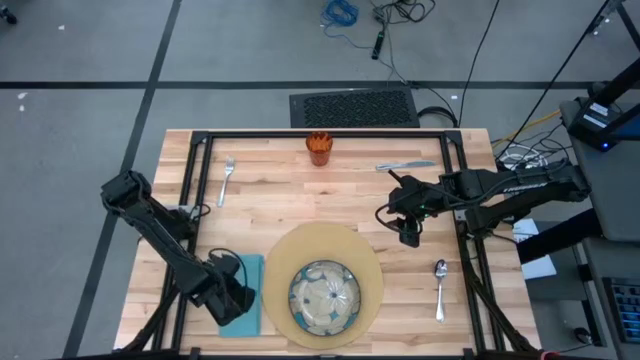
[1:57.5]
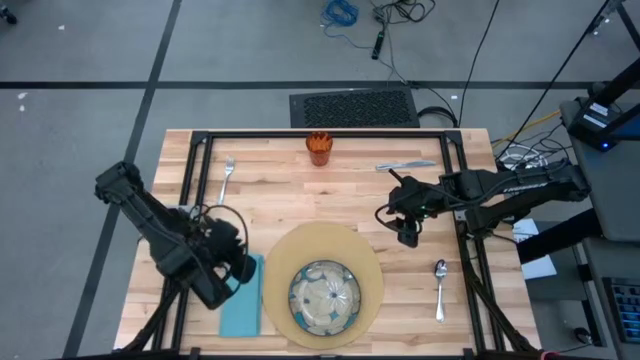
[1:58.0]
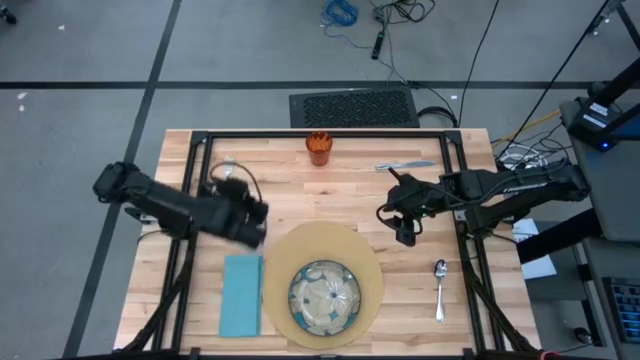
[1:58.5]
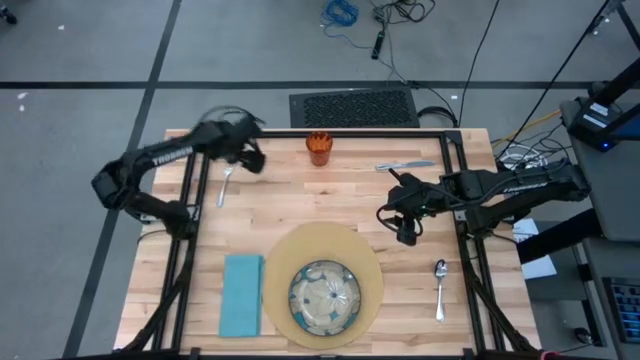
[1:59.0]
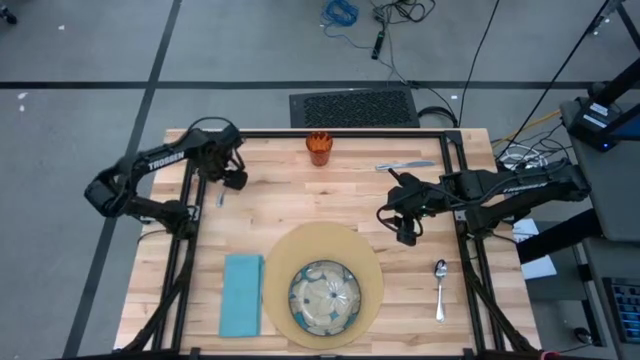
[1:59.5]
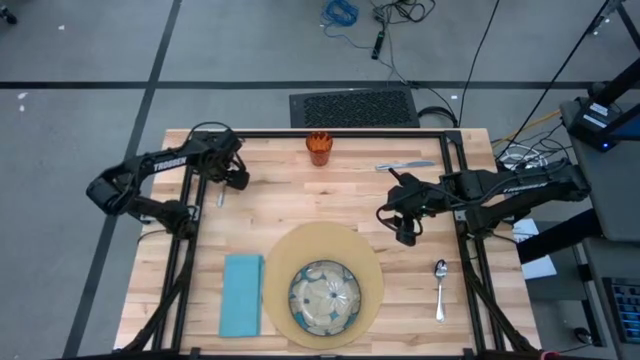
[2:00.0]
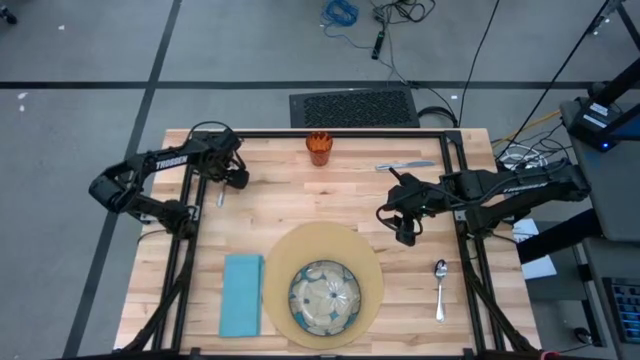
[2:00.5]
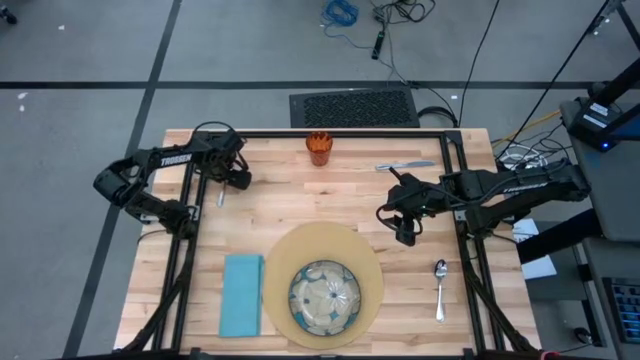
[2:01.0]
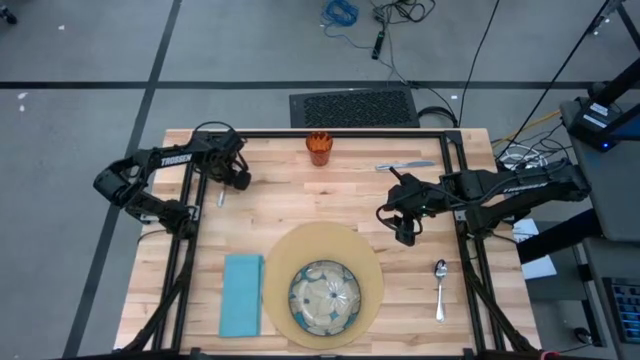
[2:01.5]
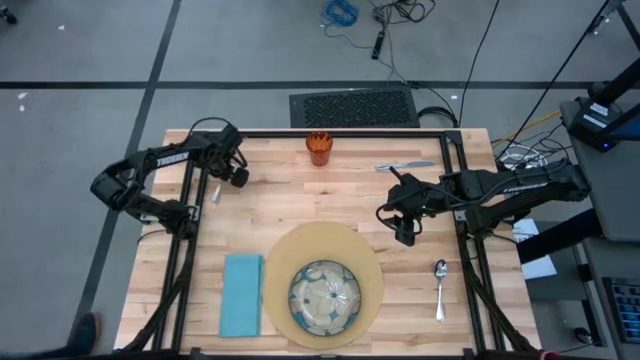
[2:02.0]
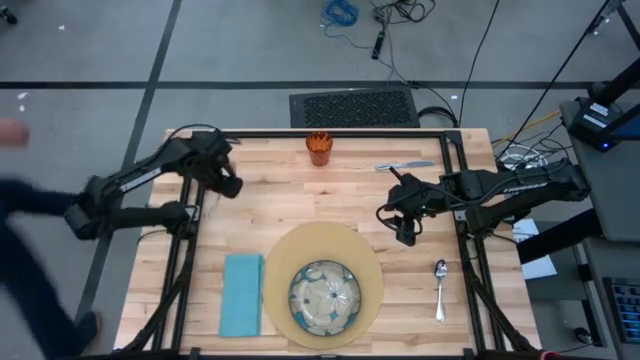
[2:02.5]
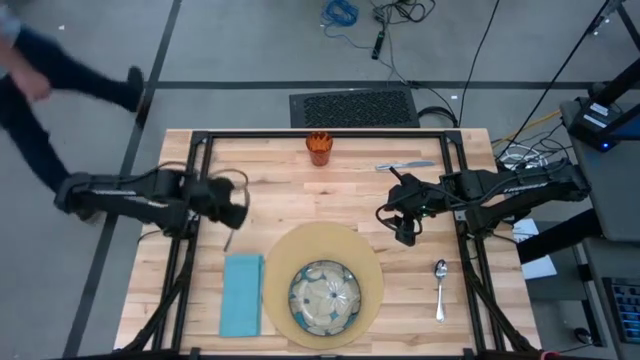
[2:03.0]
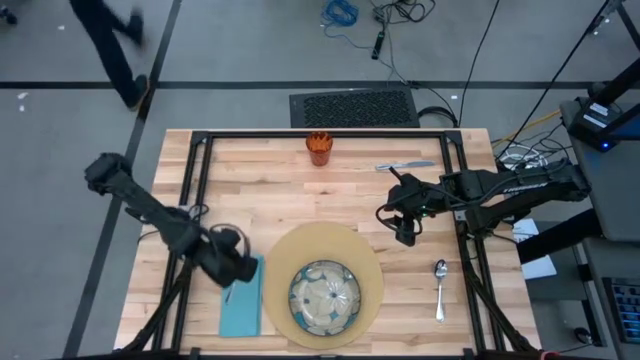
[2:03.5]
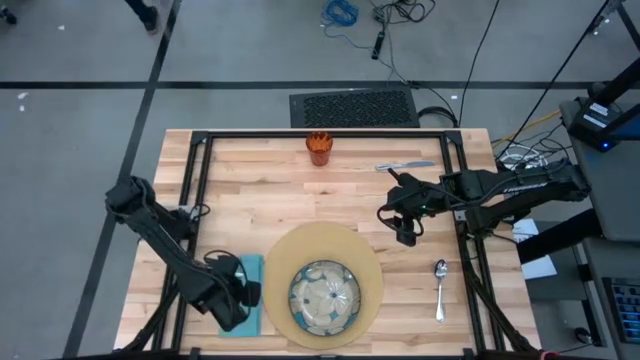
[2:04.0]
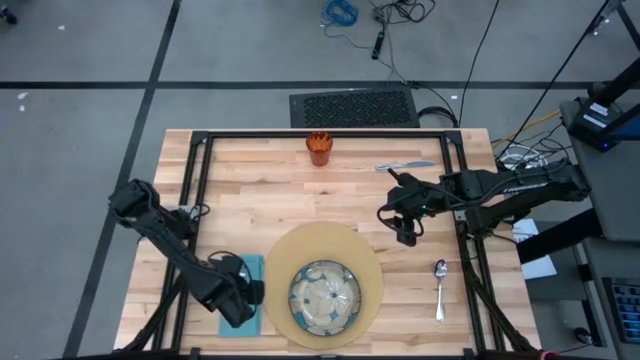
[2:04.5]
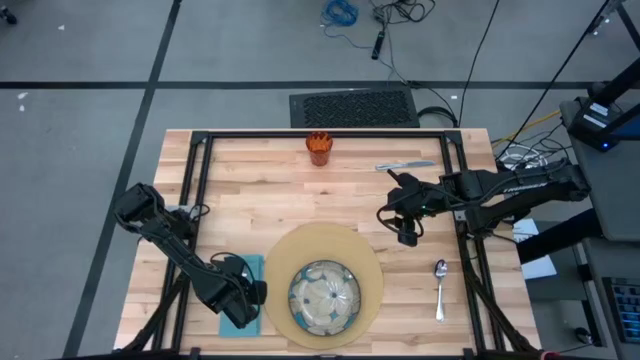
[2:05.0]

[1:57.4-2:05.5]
Task: Set table place
Put the silver fork on the blue table napkin

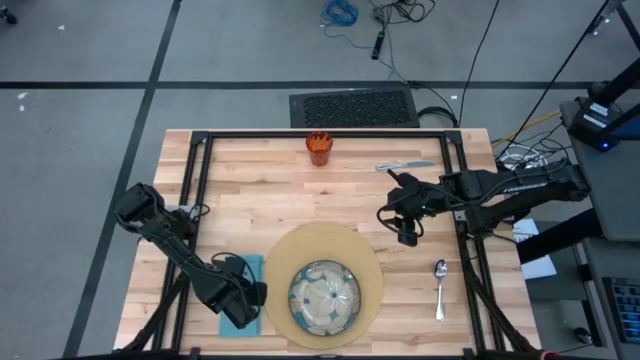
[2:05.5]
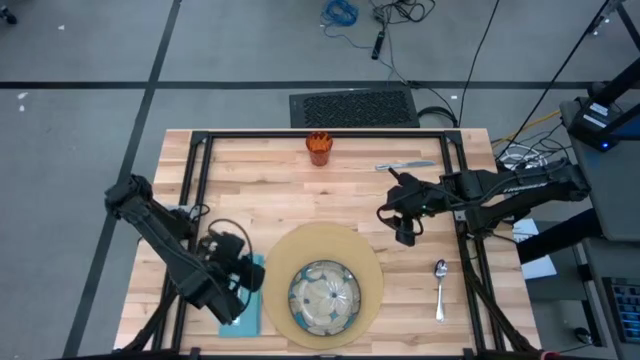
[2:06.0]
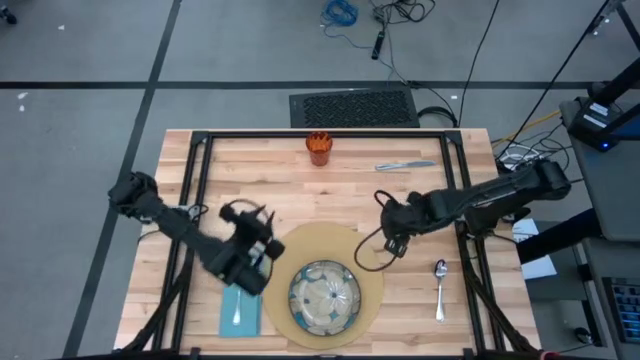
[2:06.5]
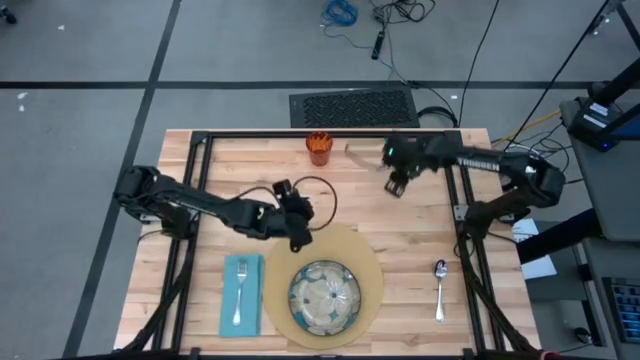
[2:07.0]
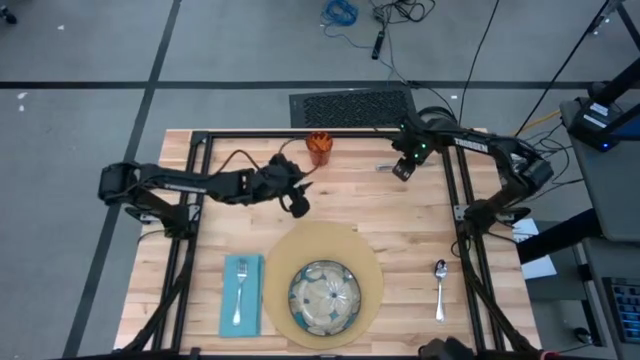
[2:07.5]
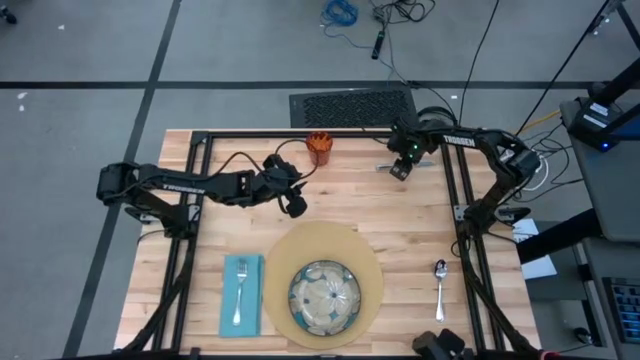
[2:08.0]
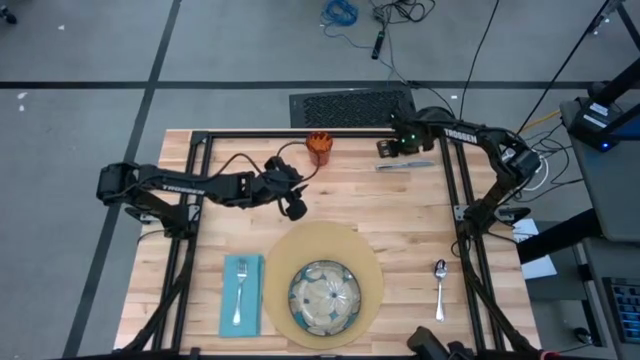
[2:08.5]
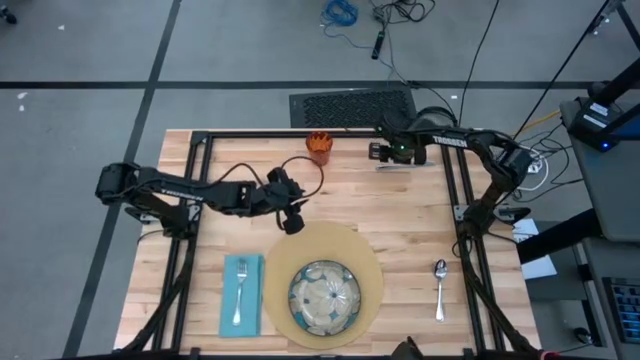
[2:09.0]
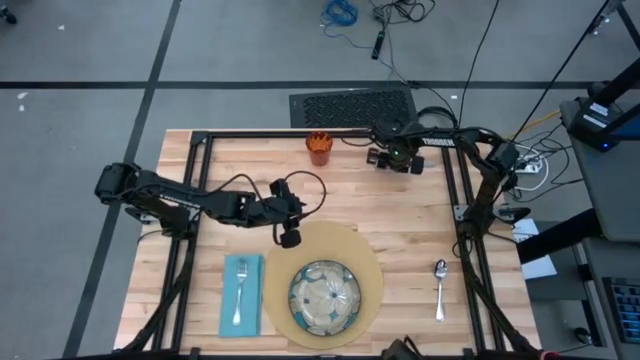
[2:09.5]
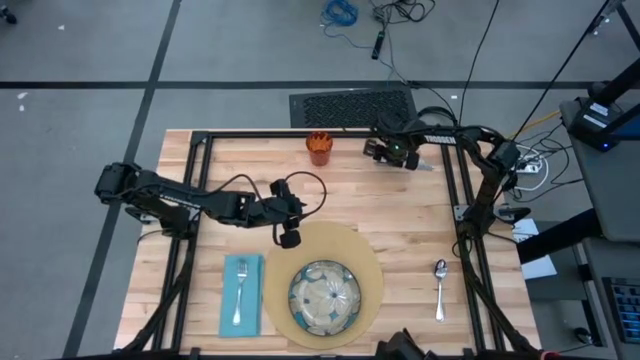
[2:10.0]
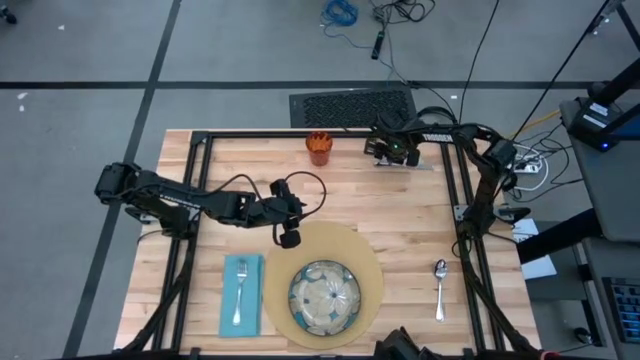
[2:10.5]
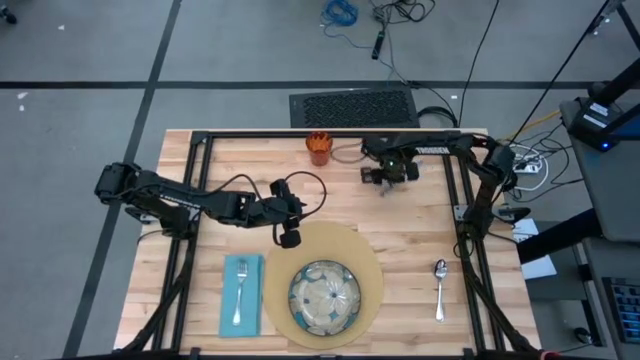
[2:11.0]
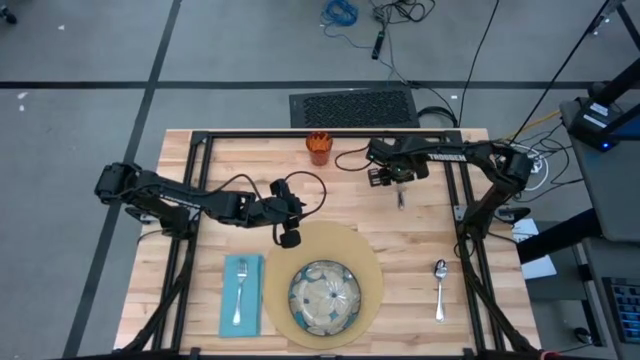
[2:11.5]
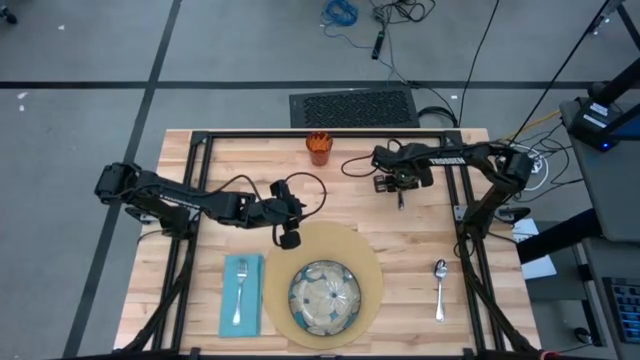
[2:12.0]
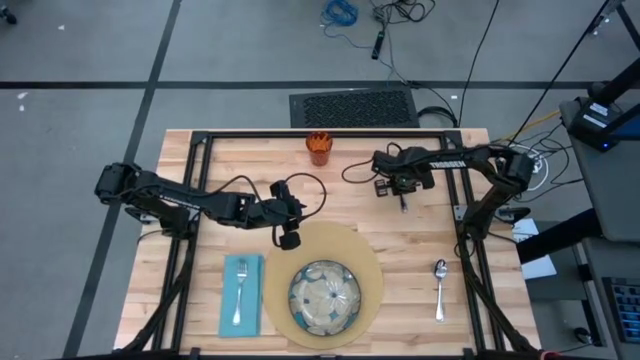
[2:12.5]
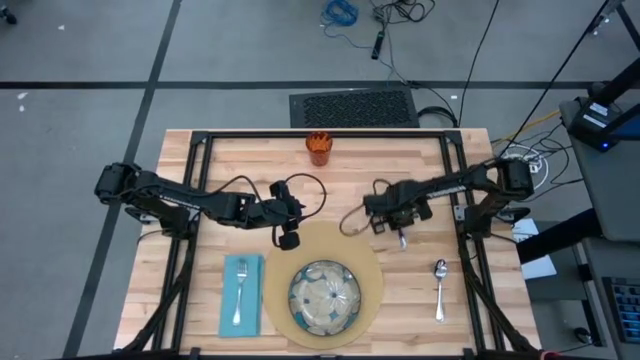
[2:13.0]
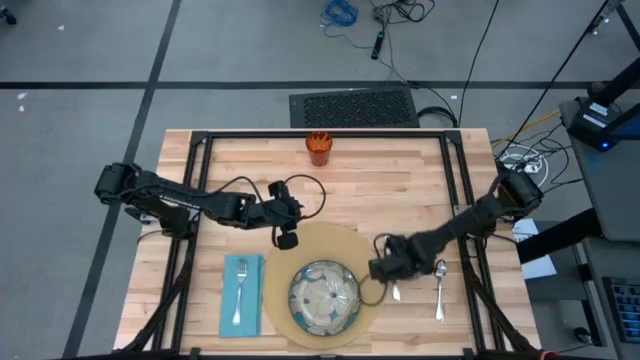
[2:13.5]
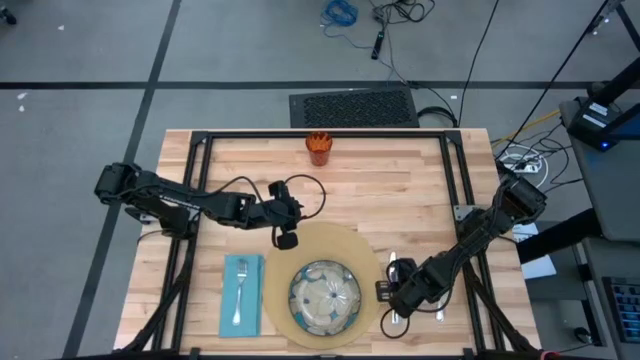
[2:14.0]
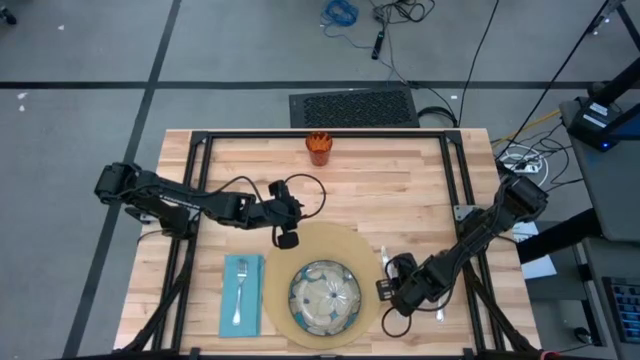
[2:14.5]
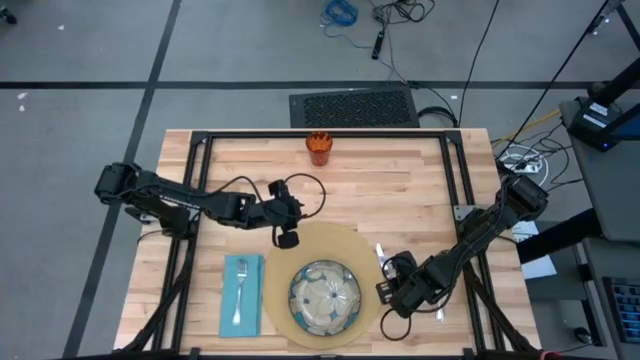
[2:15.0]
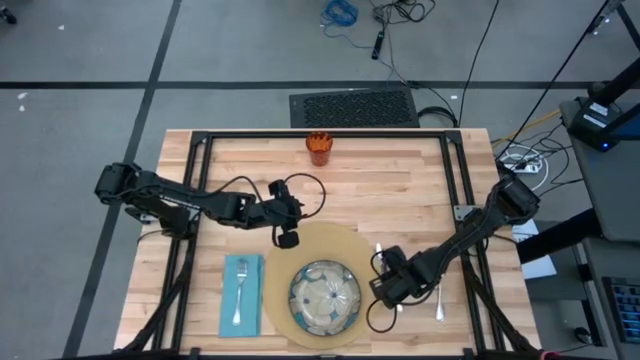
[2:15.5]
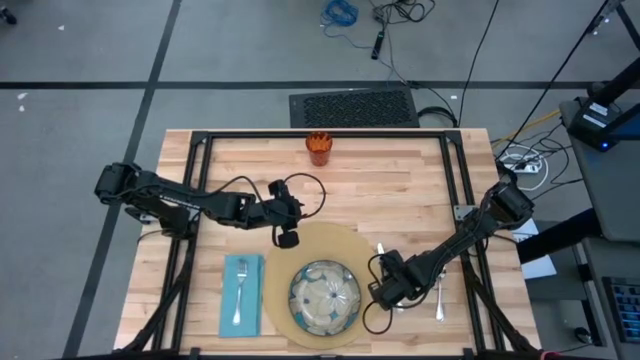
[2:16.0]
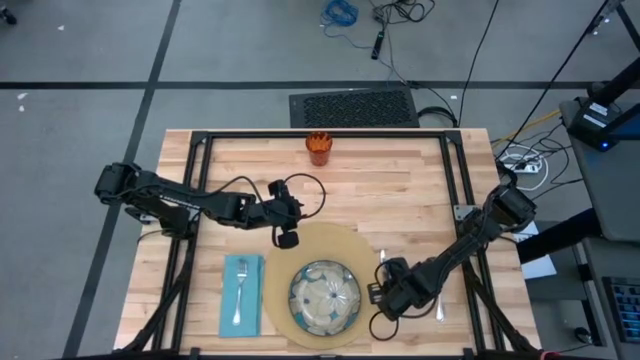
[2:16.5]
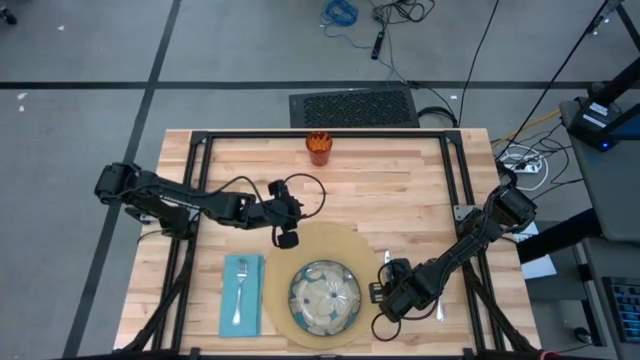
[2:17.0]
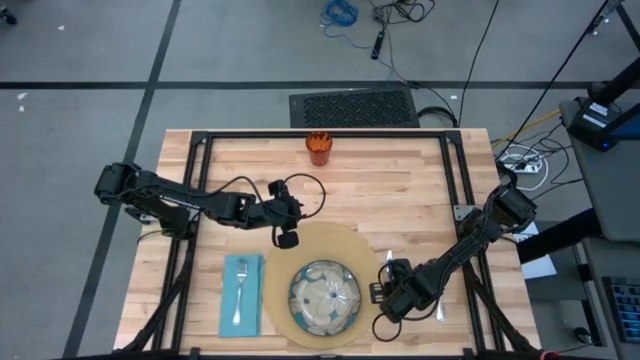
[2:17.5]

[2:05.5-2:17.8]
Put the silver knife in the middle right of the table
